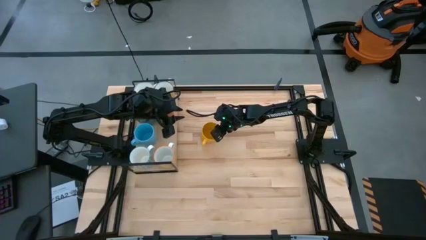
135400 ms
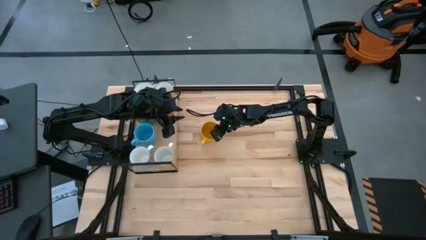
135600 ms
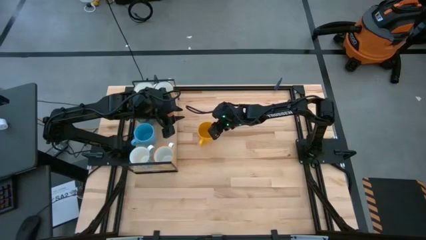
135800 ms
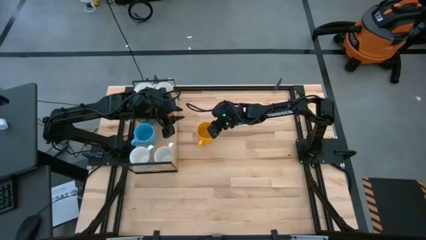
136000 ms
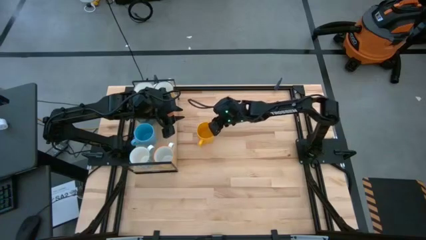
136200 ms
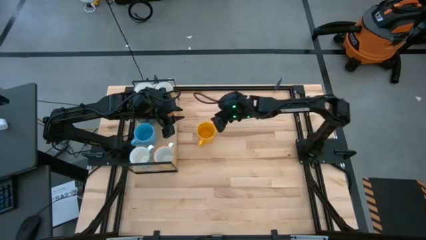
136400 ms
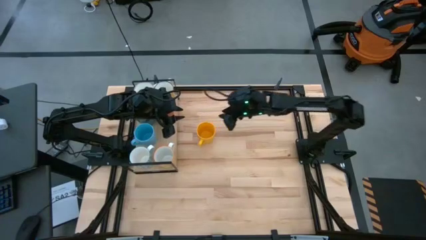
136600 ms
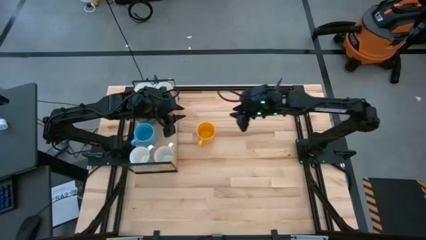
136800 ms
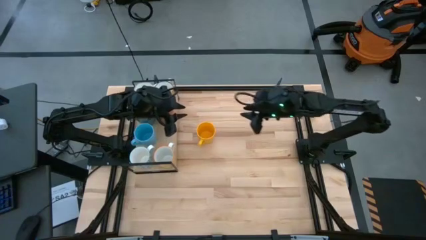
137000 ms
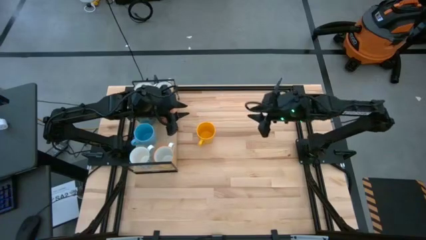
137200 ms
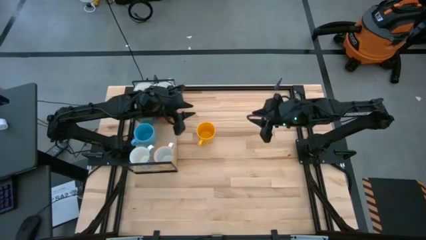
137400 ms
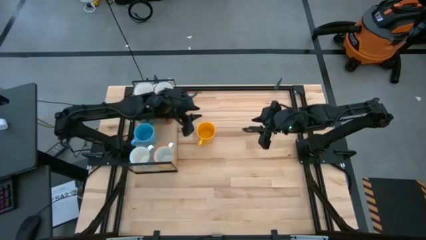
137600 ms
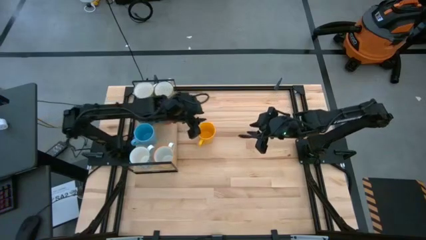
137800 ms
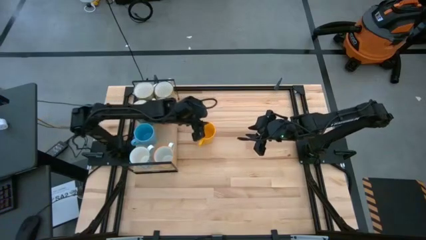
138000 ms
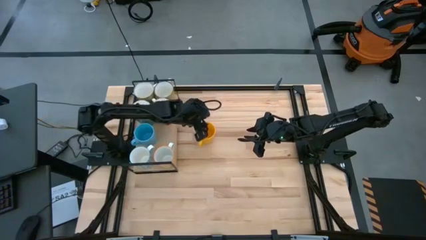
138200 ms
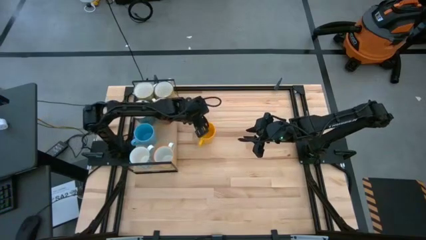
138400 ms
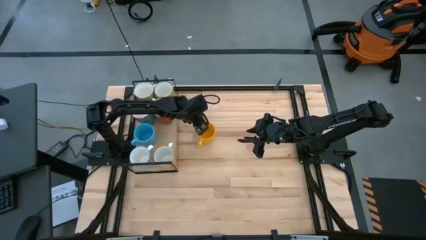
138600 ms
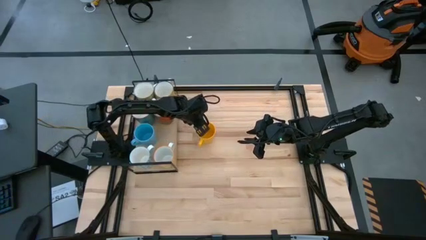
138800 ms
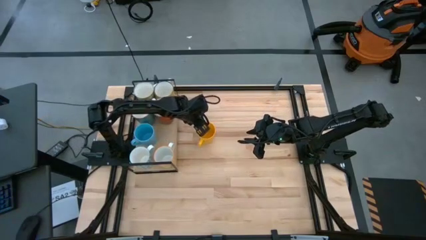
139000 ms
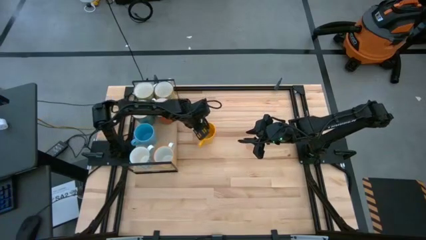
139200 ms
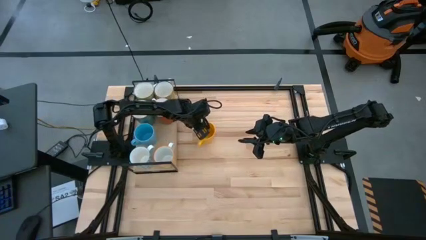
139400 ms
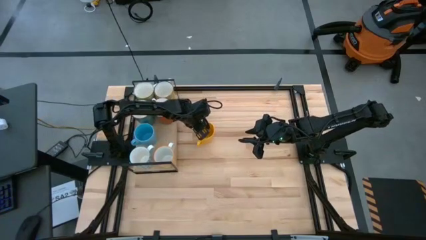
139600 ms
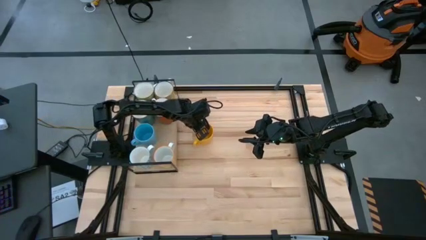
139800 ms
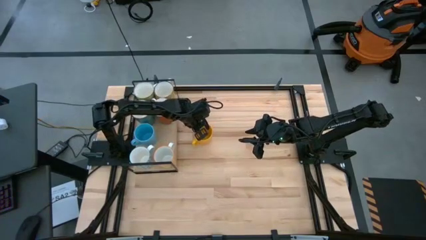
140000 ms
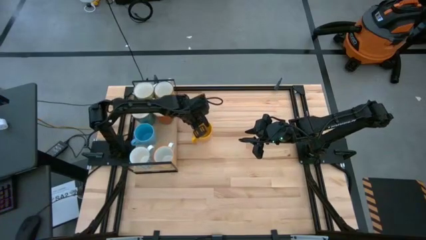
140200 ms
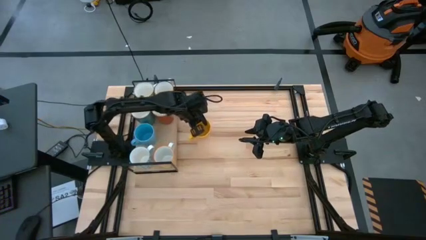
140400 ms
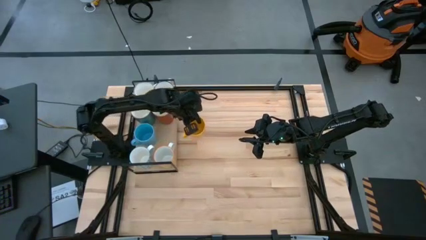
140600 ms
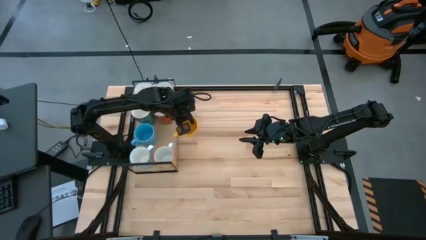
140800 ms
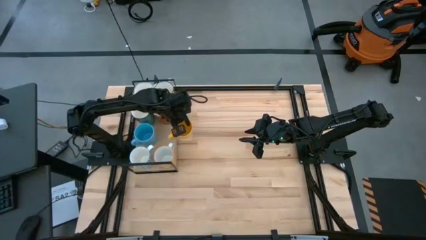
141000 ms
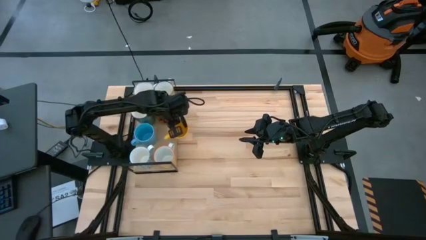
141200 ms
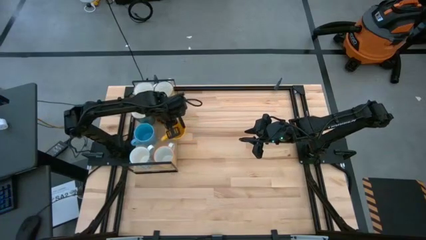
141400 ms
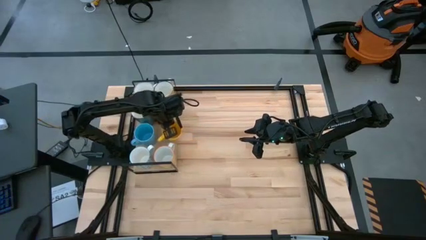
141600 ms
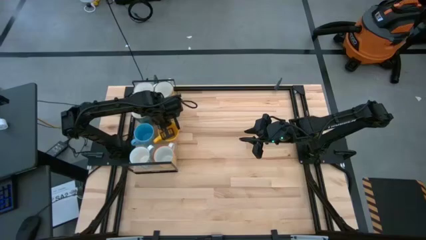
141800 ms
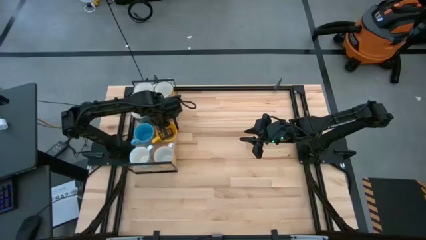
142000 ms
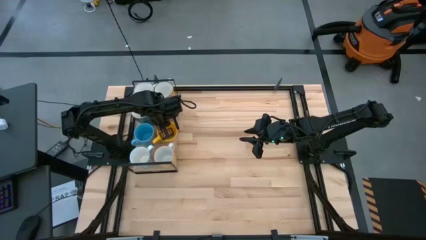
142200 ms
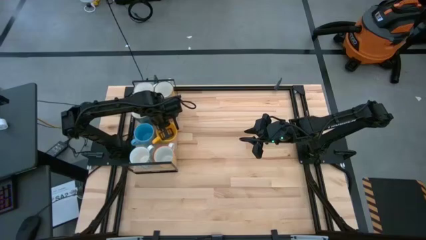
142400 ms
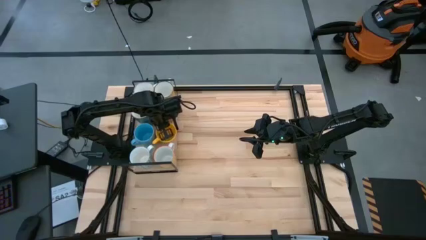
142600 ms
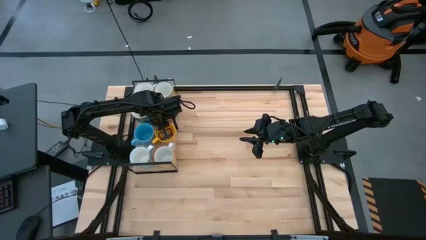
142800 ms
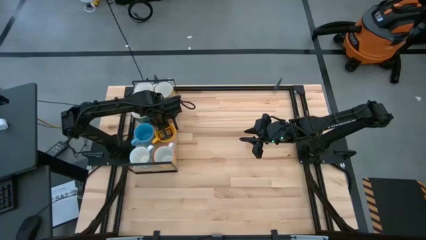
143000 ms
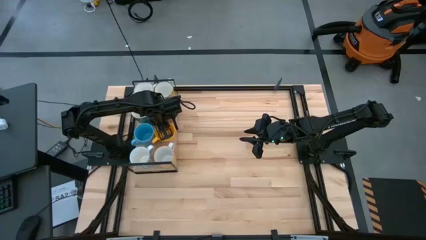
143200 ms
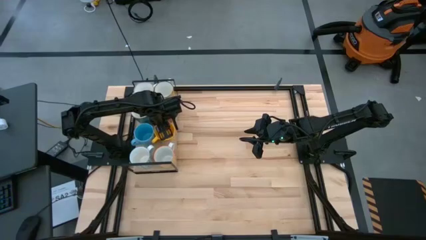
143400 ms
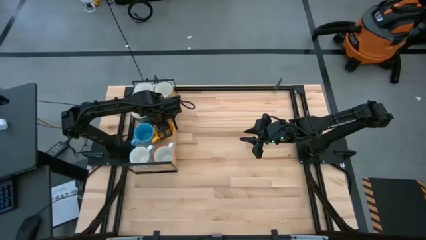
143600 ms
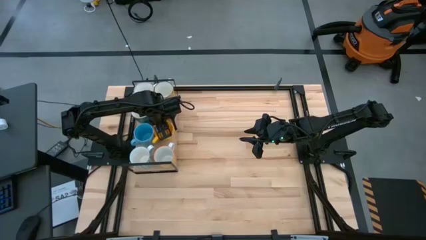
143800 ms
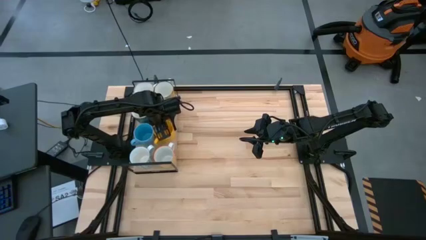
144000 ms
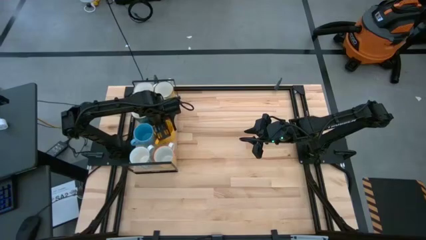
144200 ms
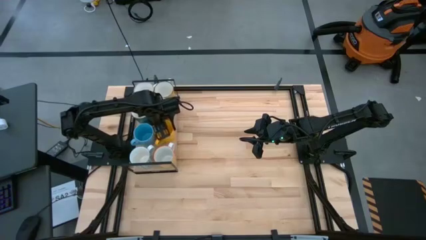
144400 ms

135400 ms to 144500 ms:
Task: Place coffee mugs
Put the yellow mug on the shelf

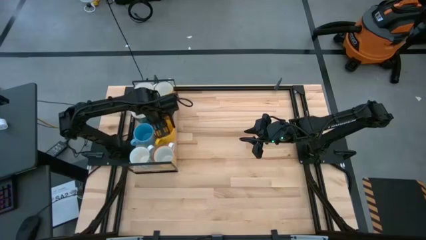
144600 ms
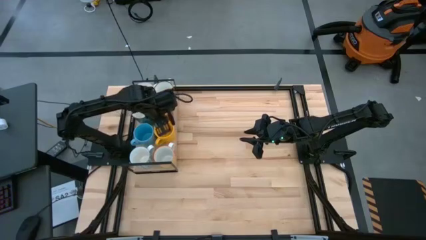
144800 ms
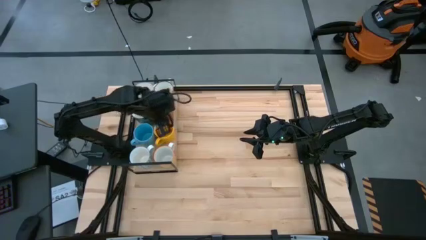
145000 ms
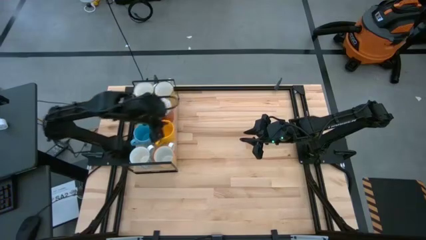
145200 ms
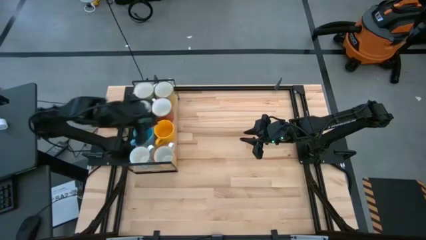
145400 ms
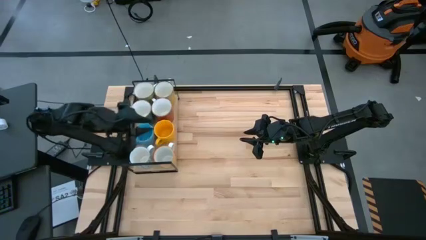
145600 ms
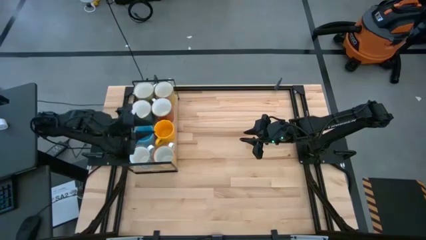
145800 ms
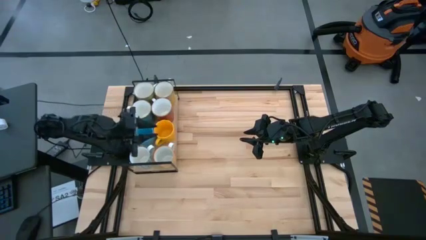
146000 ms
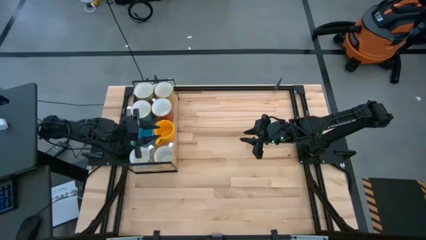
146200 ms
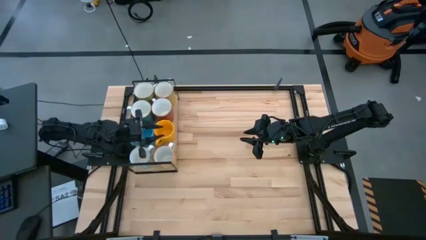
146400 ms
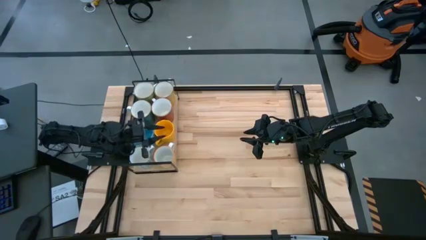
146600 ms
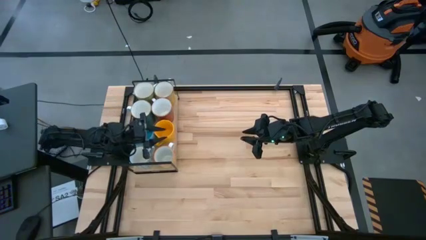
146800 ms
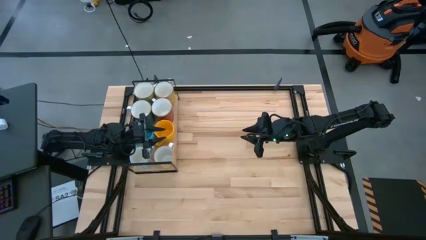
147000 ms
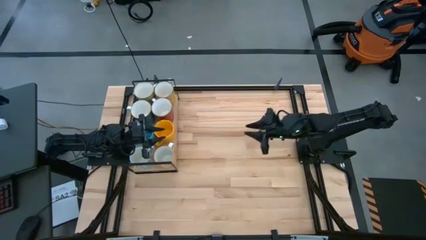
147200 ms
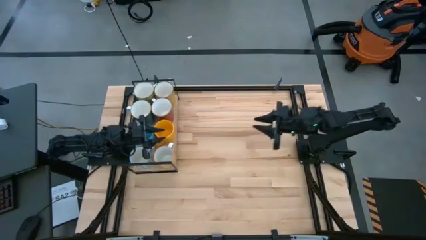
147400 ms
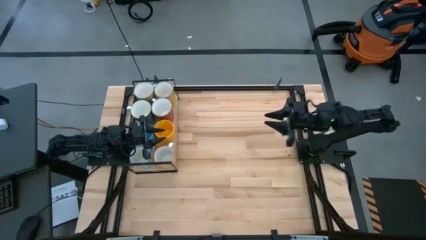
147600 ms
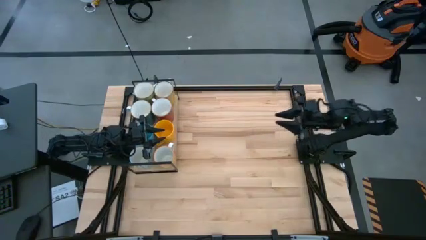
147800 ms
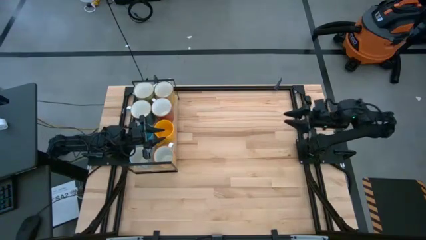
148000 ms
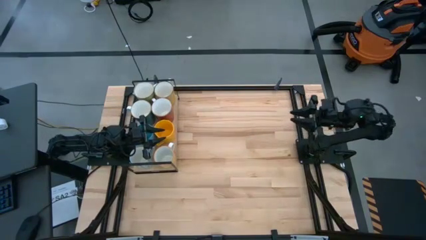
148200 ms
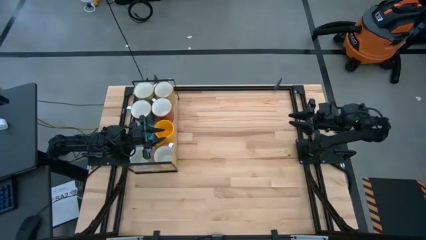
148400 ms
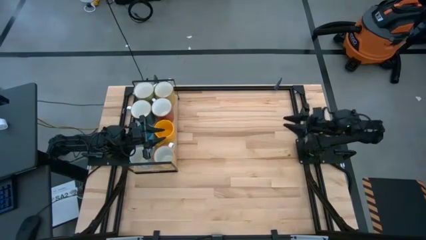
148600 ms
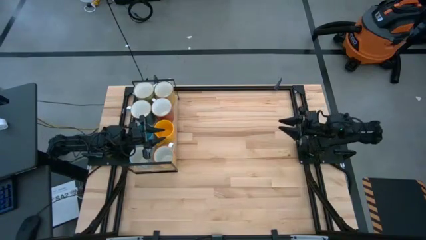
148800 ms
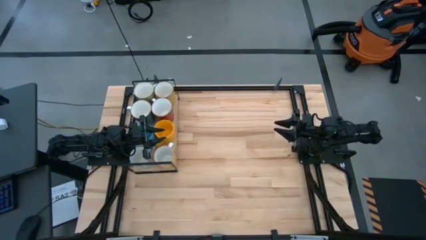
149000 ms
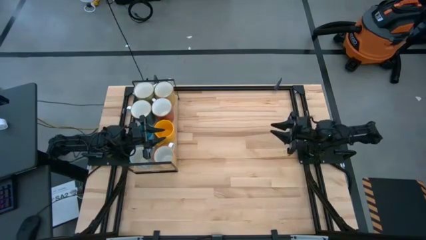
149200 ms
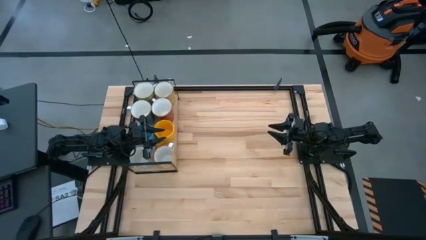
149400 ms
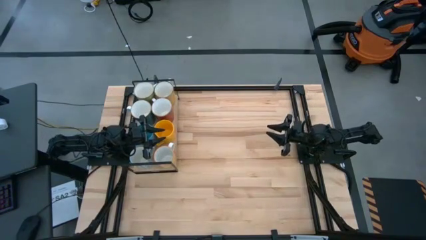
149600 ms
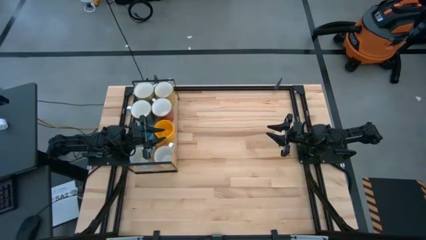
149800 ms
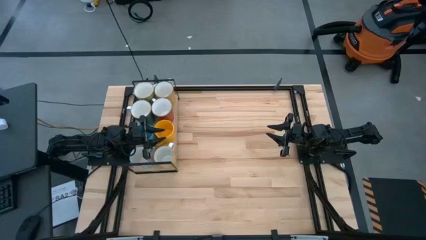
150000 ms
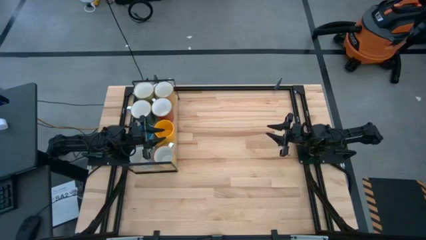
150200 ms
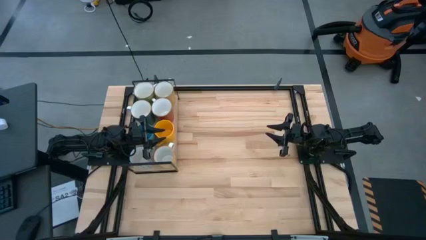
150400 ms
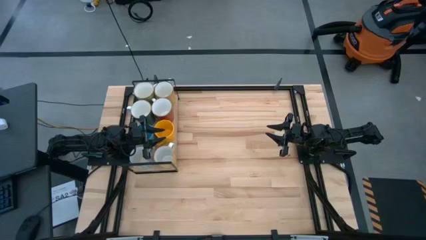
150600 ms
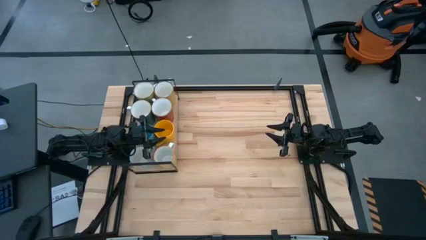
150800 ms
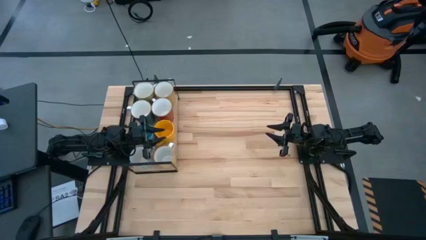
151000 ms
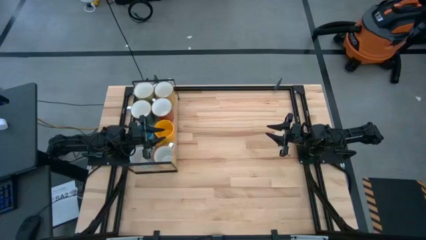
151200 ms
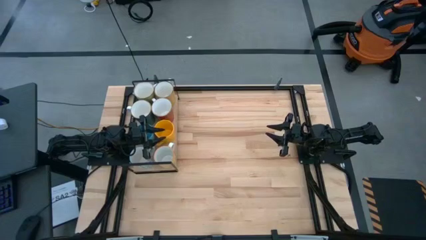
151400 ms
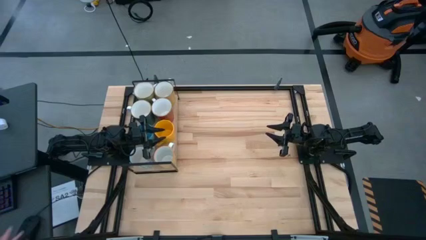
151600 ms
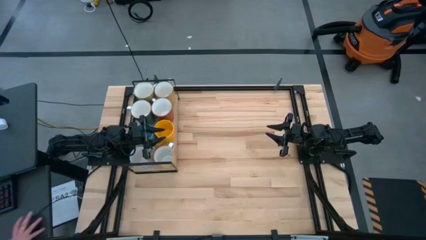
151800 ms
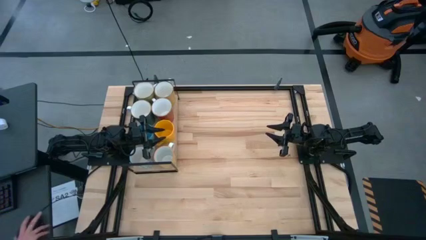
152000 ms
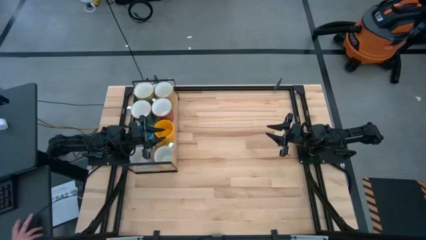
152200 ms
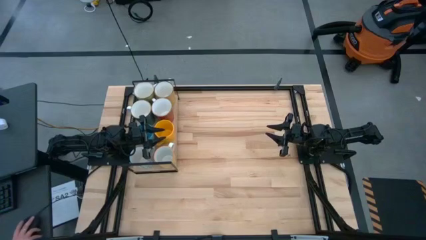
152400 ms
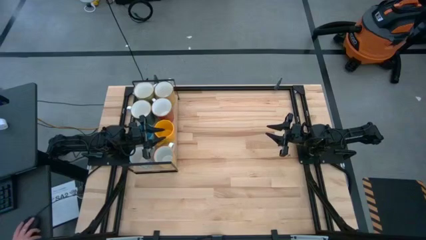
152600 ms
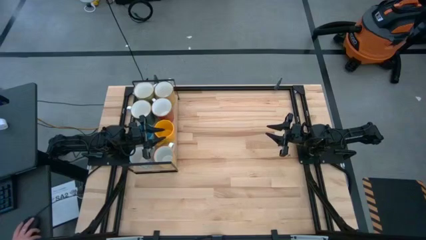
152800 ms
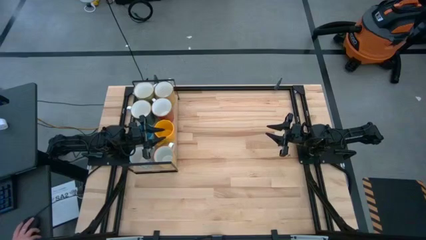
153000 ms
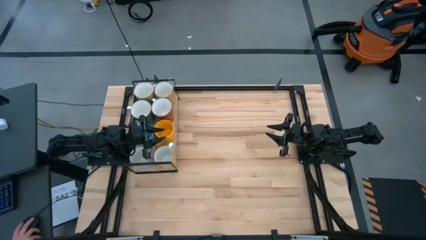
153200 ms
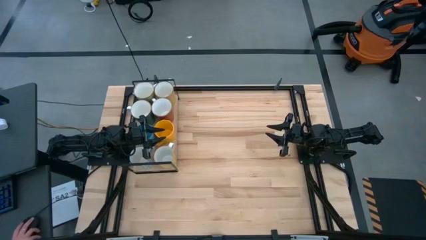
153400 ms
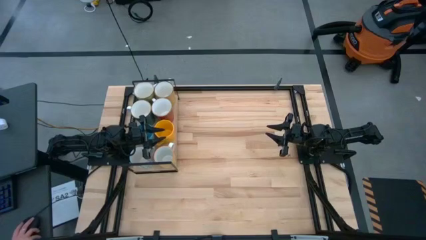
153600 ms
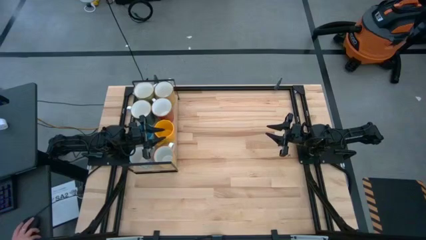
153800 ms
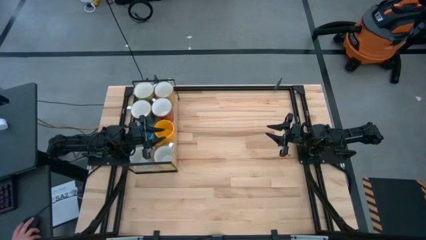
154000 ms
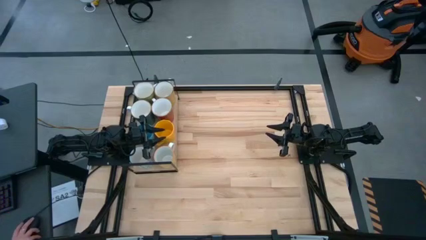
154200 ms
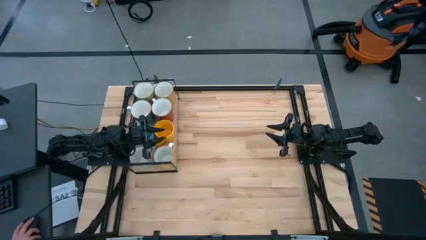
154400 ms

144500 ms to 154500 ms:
Return to Home Position
